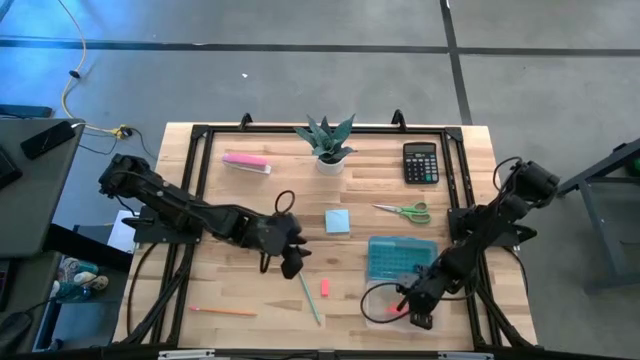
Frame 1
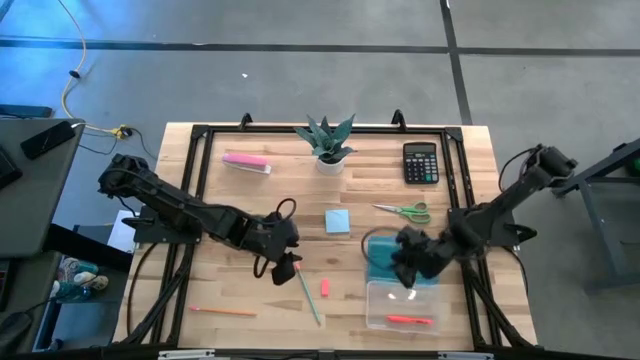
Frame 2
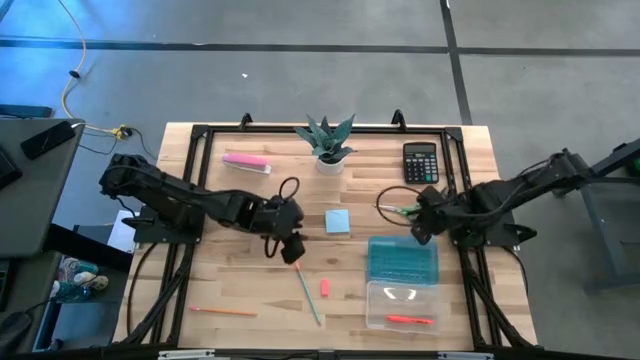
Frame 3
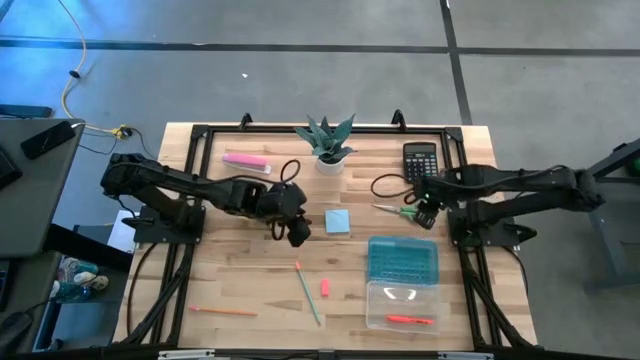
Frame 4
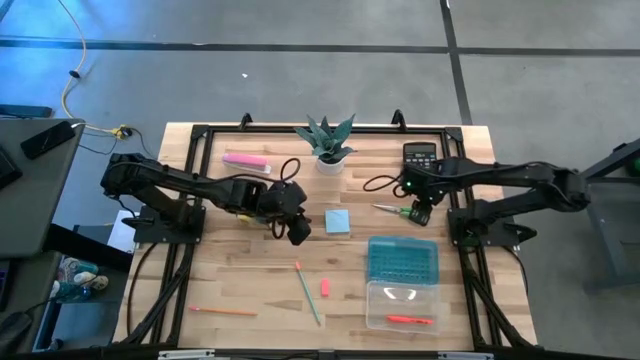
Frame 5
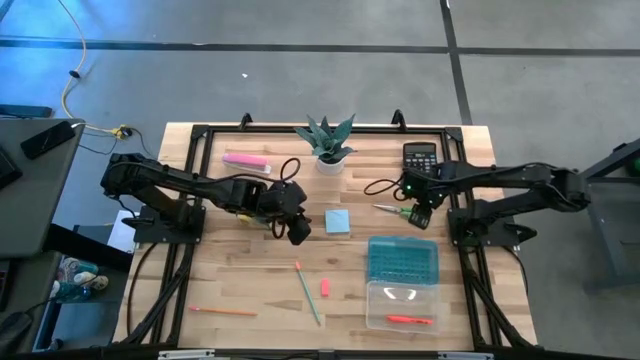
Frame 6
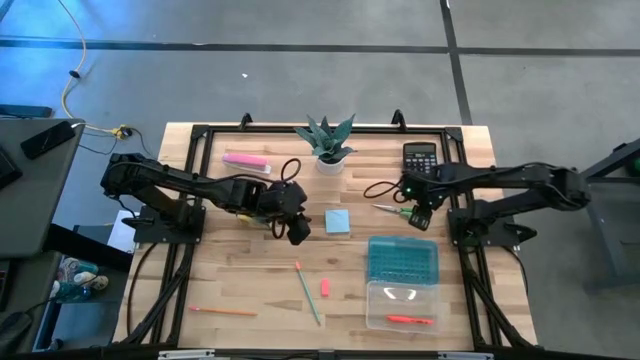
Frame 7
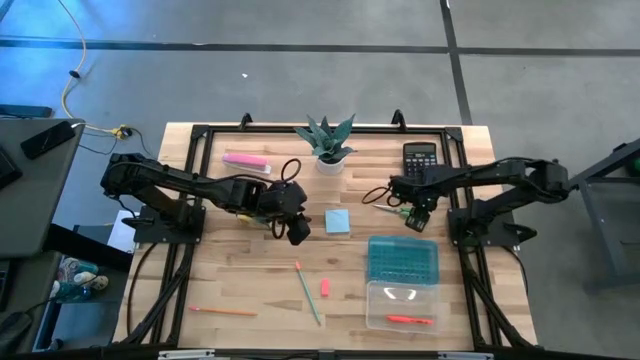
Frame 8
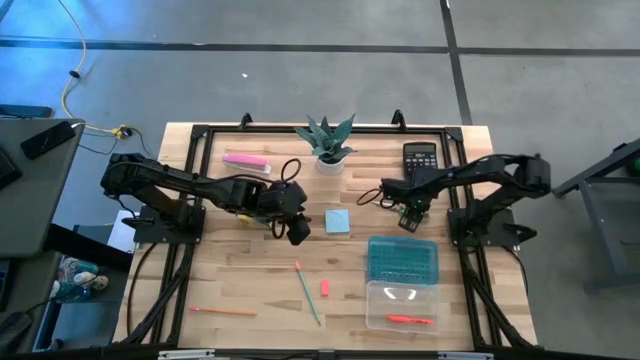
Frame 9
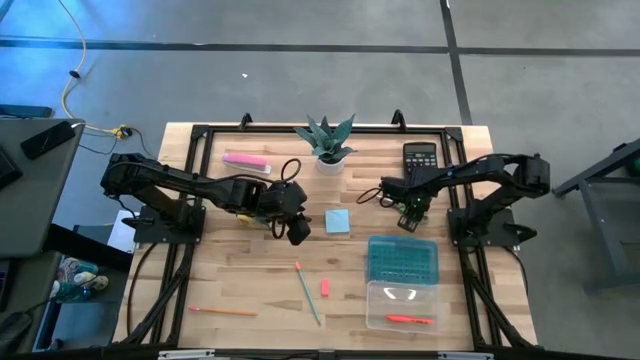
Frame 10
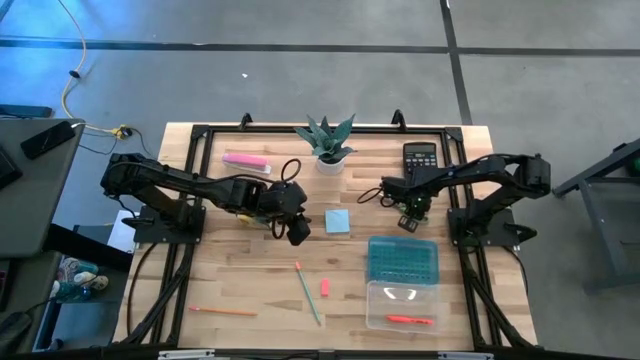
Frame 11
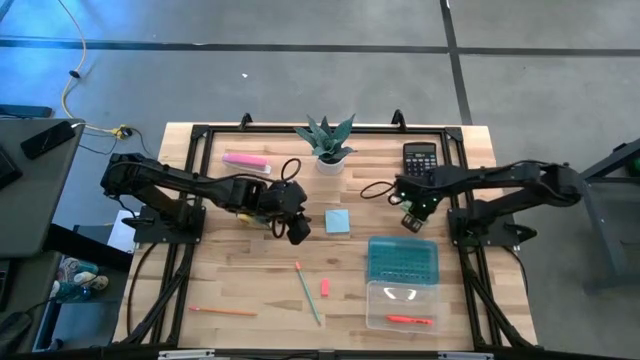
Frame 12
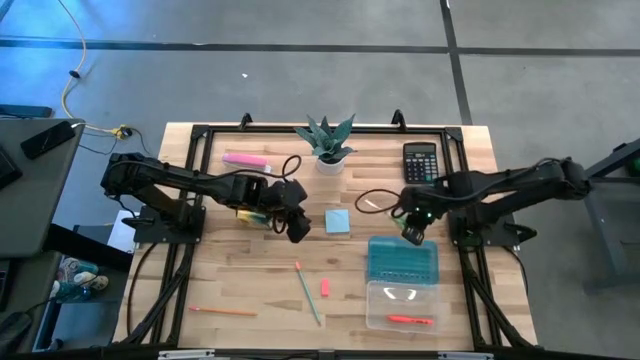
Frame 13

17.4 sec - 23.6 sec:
Task: Pack school essentials
Put the green scissors into the blue supply box

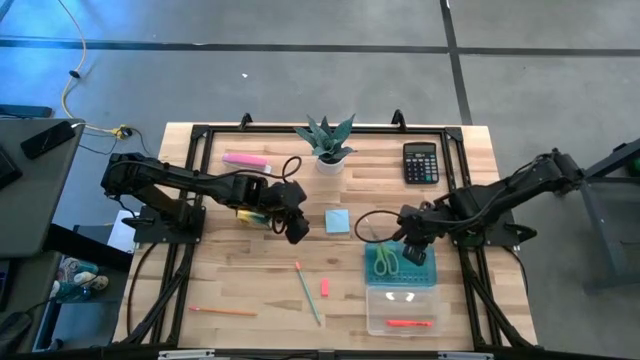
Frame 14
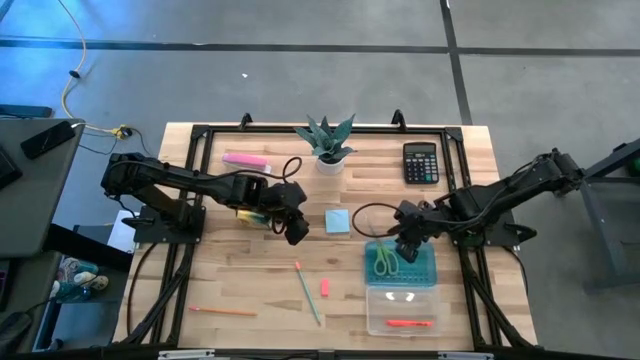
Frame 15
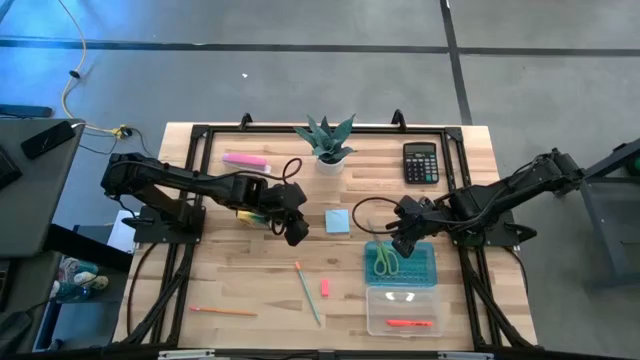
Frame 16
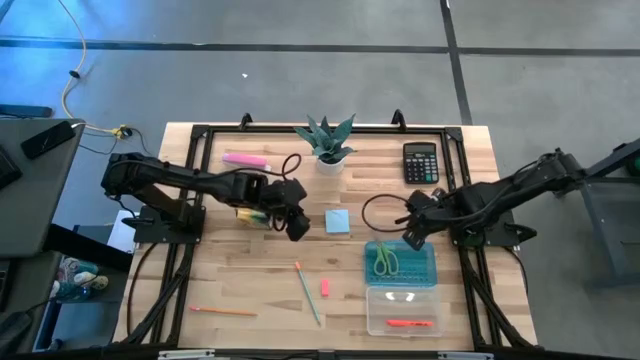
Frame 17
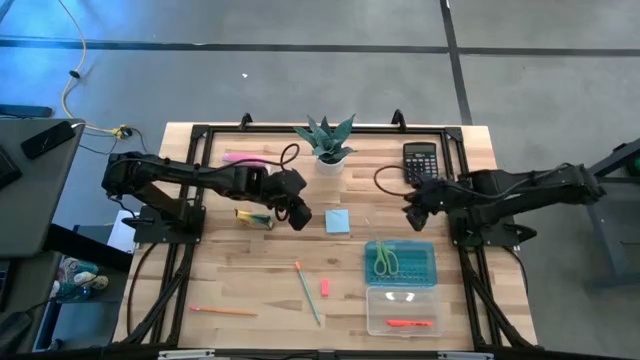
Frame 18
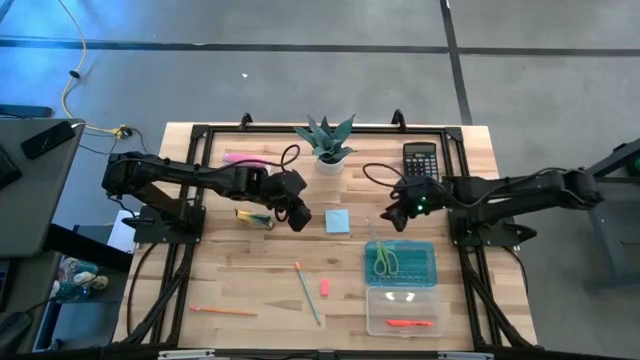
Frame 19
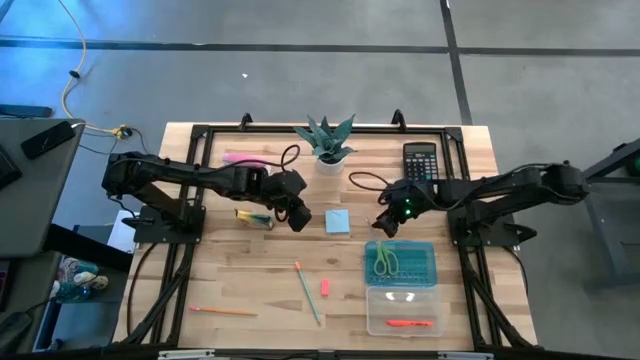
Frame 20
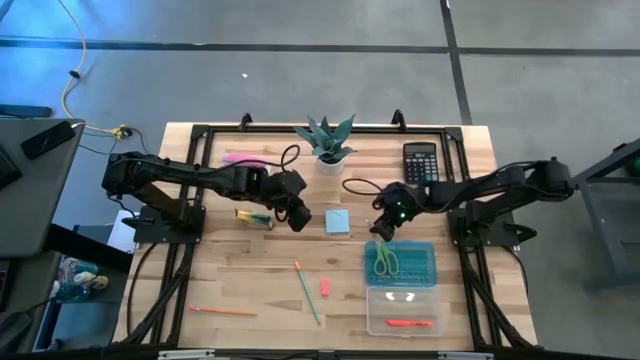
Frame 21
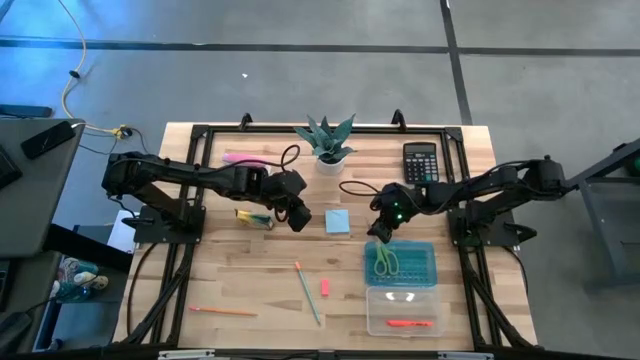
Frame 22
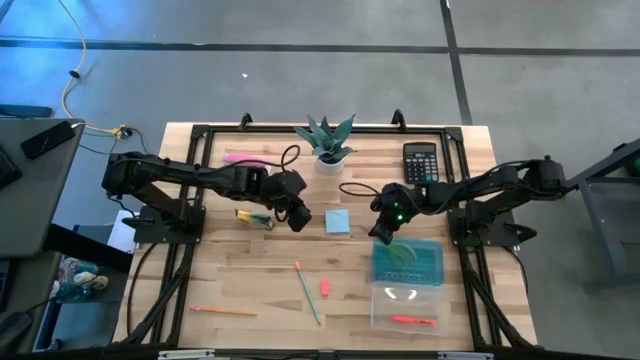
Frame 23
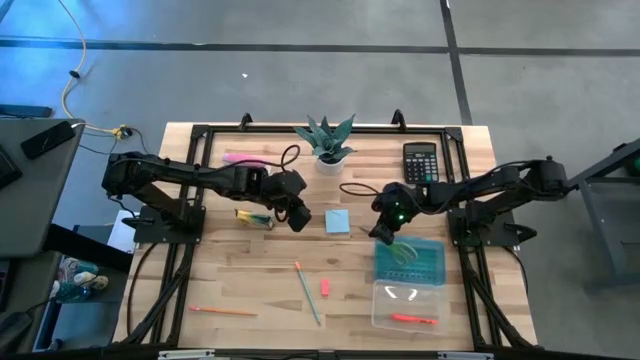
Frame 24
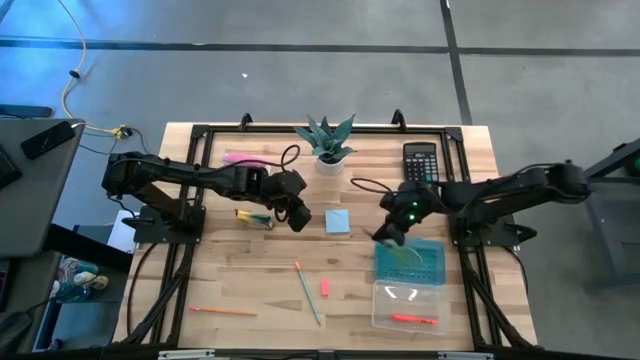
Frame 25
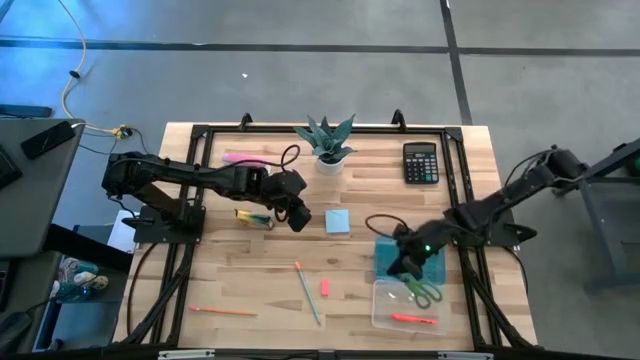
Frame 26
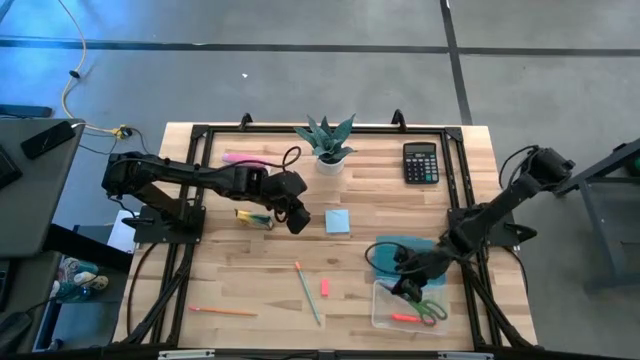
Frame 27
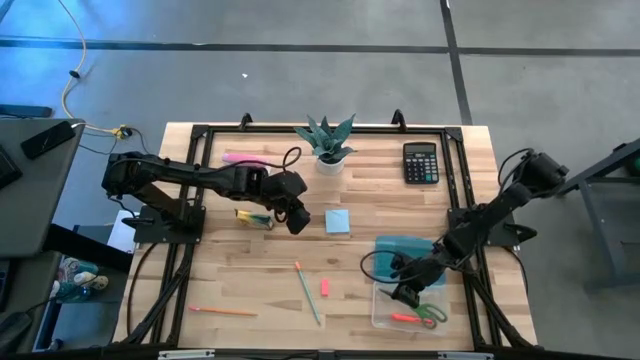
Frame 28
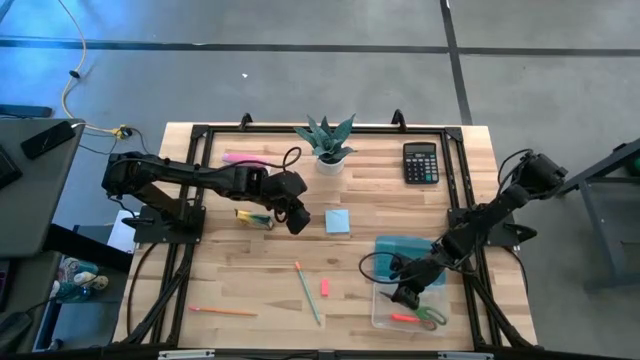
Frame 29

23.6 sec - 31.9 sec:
Put the green scissors into the blue supply box
